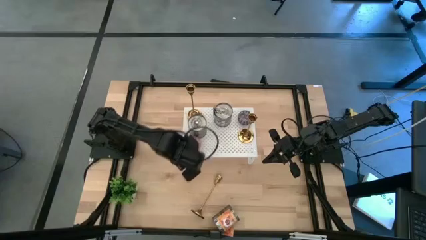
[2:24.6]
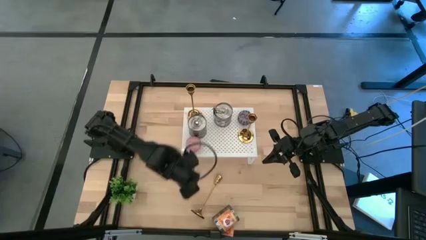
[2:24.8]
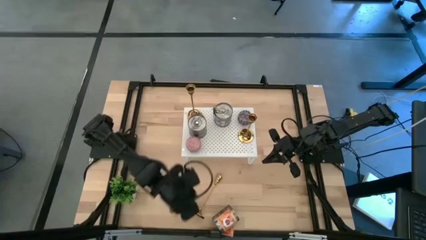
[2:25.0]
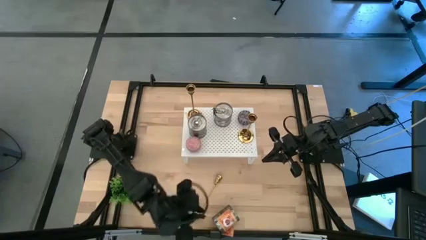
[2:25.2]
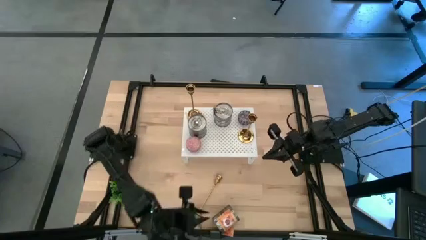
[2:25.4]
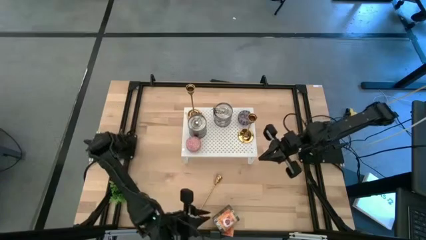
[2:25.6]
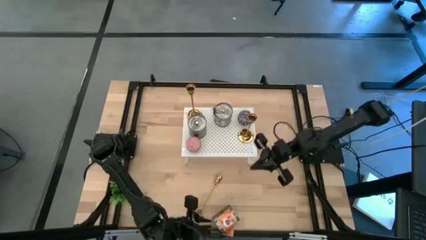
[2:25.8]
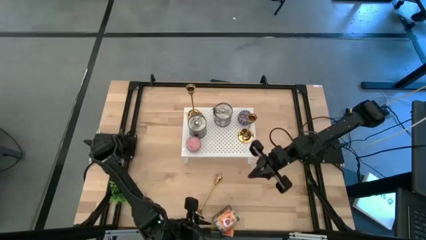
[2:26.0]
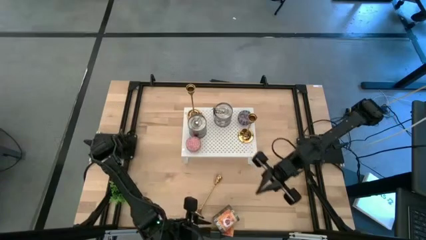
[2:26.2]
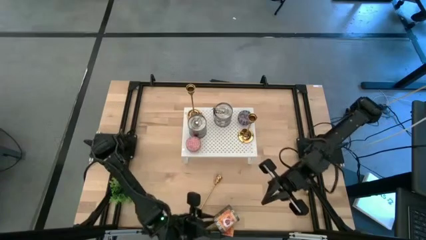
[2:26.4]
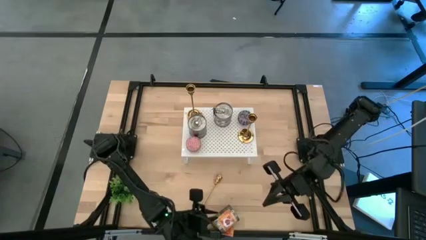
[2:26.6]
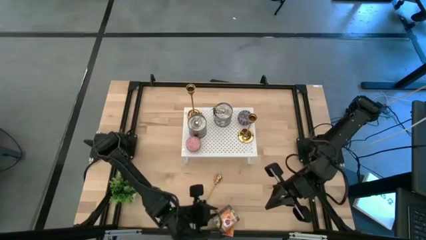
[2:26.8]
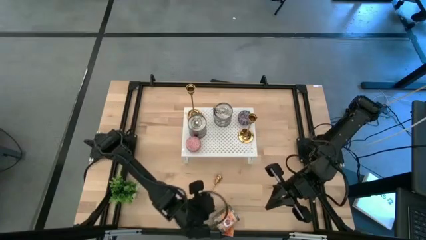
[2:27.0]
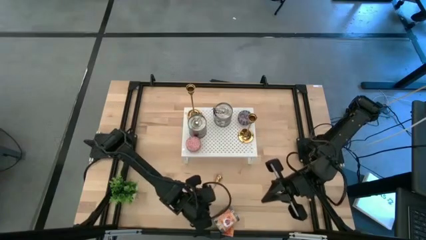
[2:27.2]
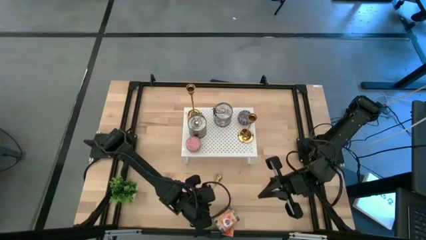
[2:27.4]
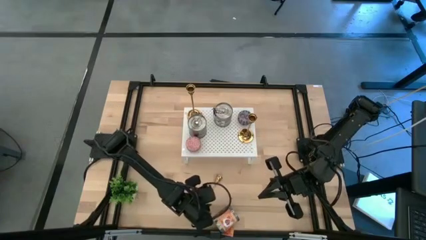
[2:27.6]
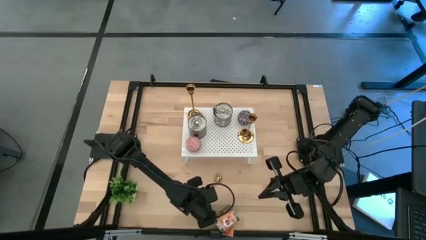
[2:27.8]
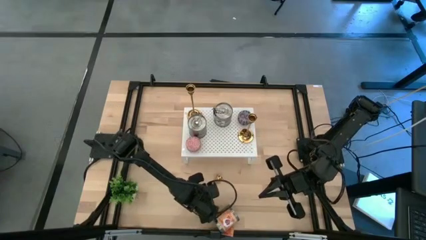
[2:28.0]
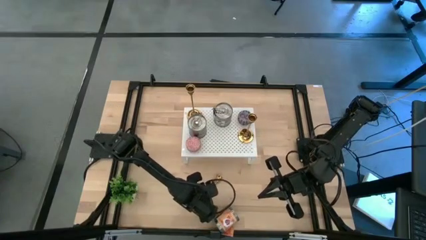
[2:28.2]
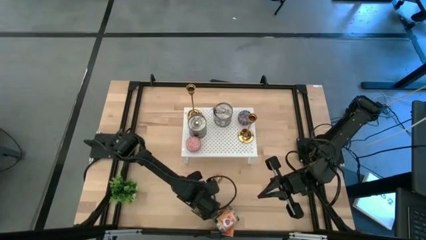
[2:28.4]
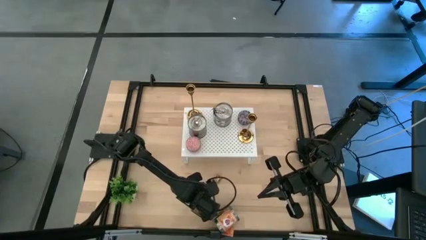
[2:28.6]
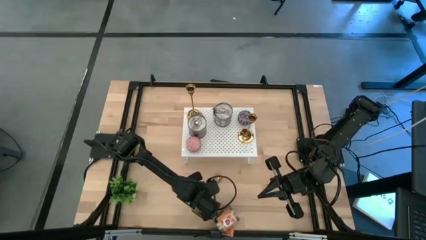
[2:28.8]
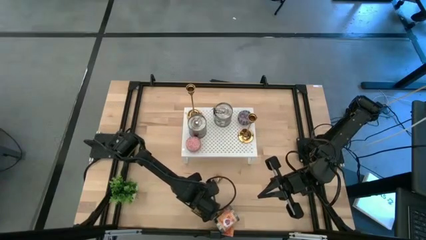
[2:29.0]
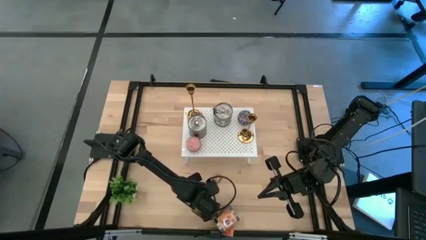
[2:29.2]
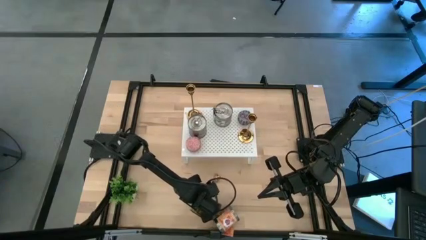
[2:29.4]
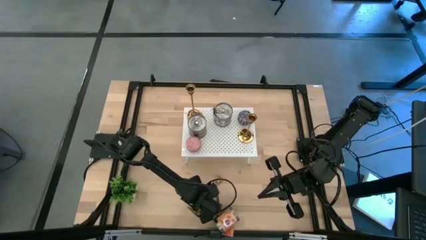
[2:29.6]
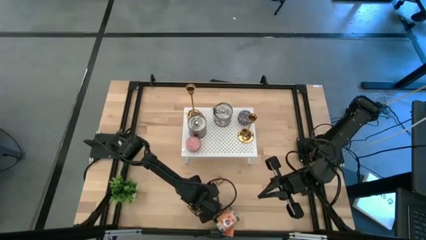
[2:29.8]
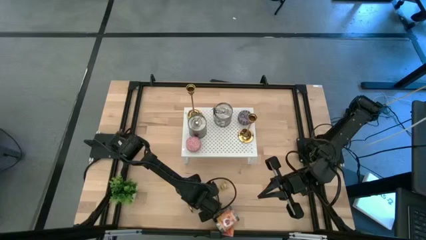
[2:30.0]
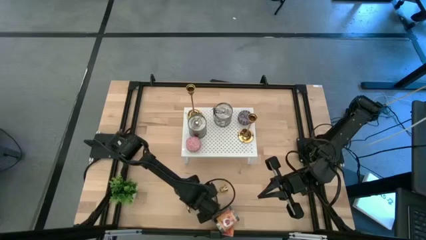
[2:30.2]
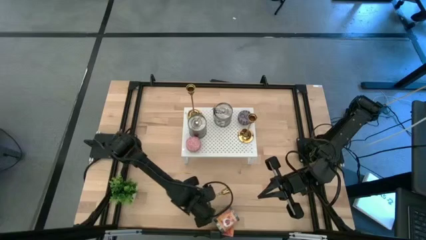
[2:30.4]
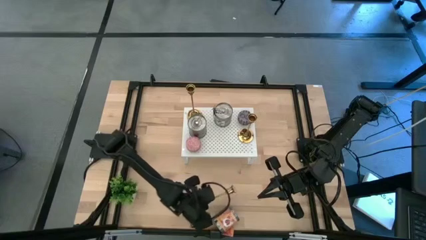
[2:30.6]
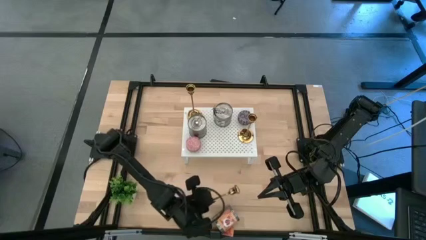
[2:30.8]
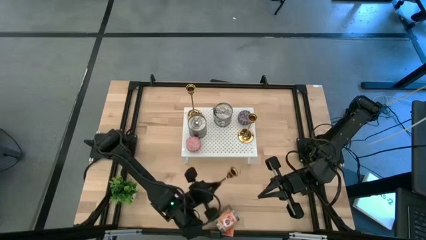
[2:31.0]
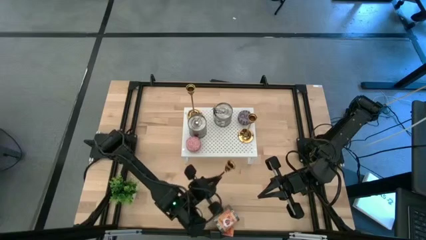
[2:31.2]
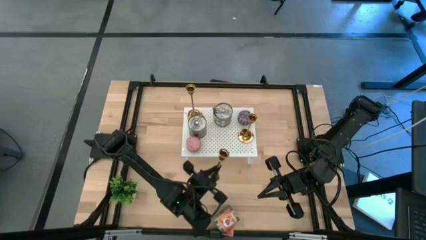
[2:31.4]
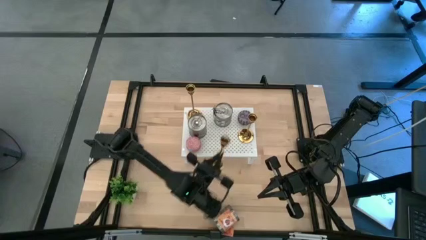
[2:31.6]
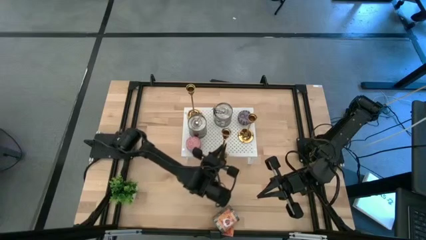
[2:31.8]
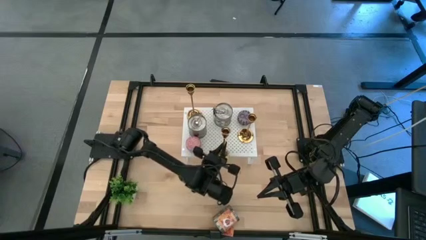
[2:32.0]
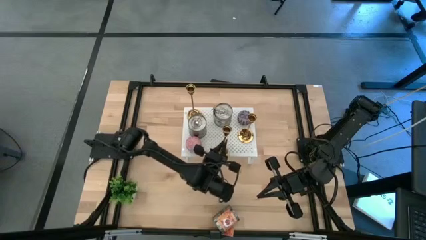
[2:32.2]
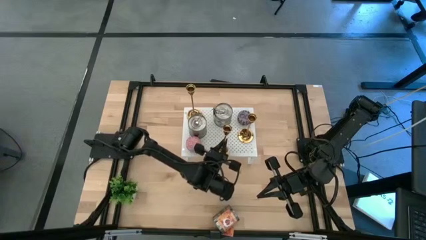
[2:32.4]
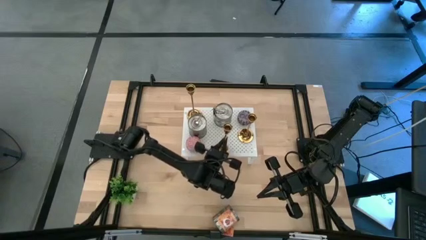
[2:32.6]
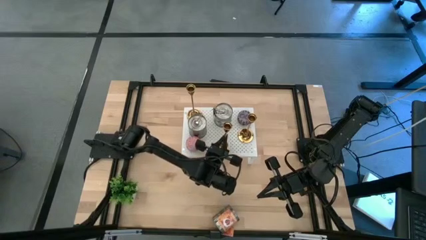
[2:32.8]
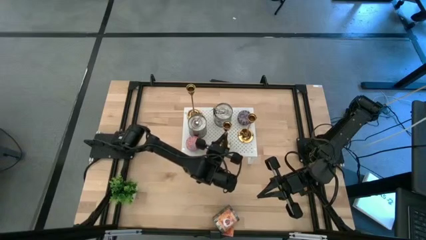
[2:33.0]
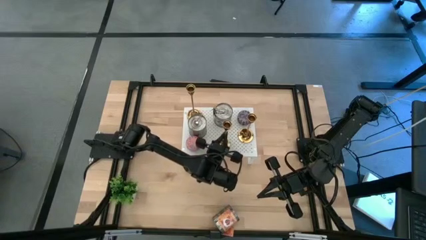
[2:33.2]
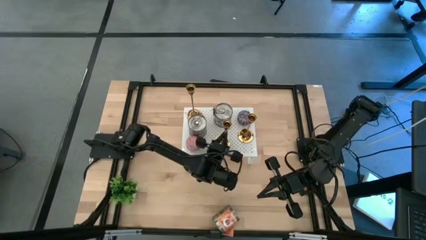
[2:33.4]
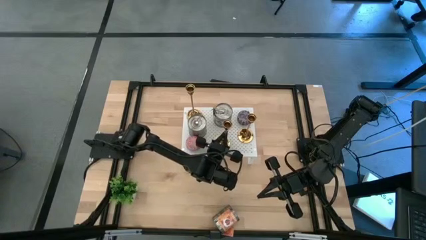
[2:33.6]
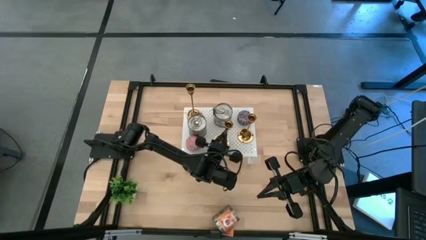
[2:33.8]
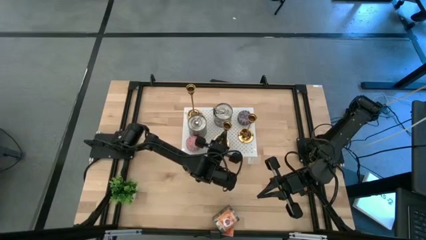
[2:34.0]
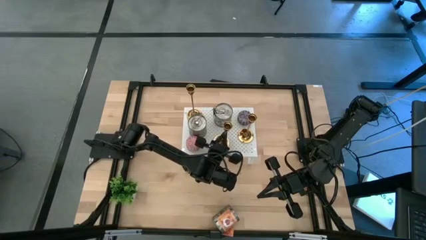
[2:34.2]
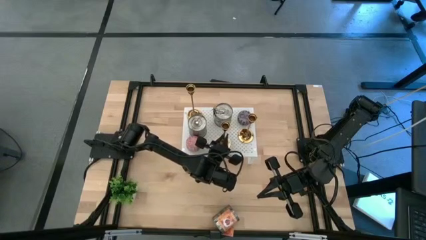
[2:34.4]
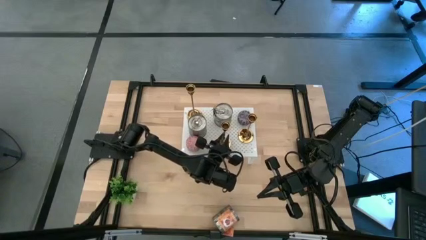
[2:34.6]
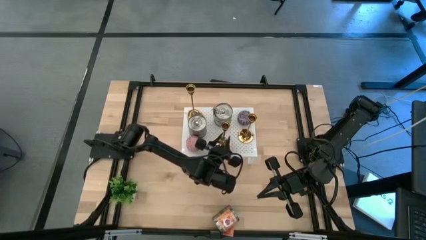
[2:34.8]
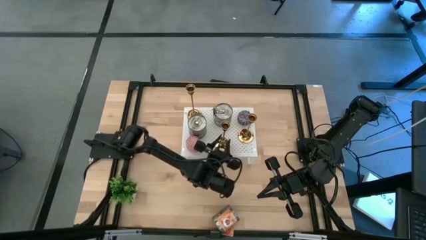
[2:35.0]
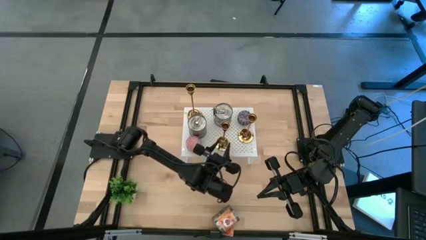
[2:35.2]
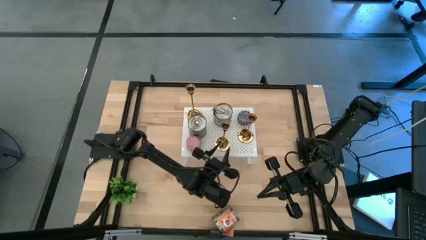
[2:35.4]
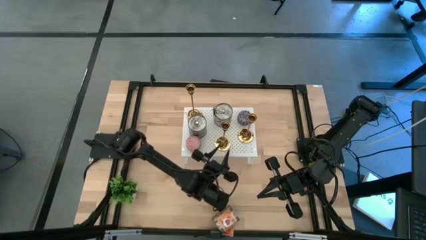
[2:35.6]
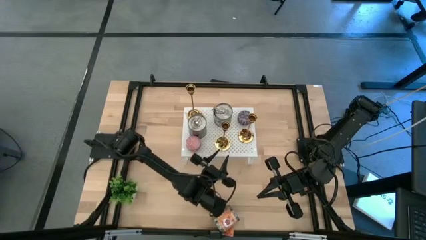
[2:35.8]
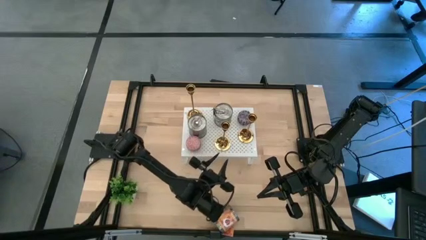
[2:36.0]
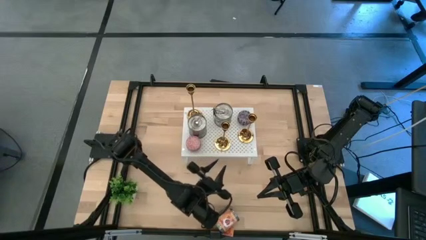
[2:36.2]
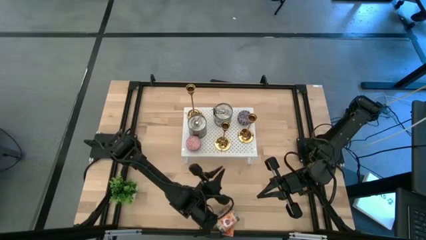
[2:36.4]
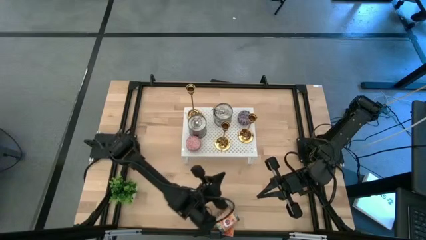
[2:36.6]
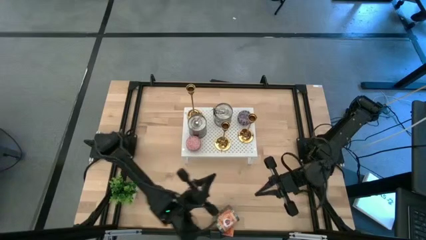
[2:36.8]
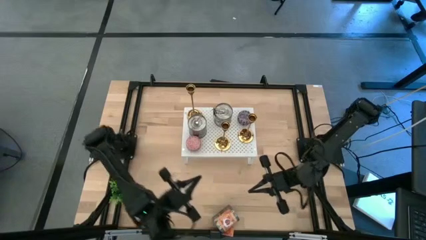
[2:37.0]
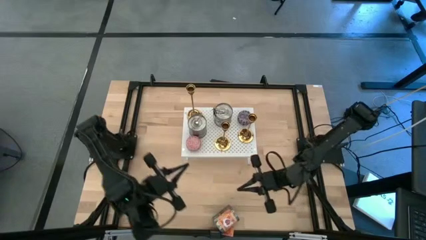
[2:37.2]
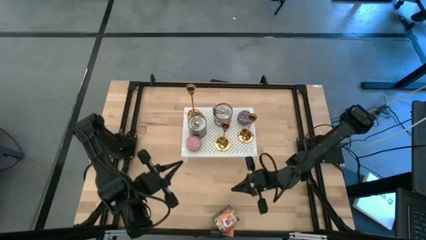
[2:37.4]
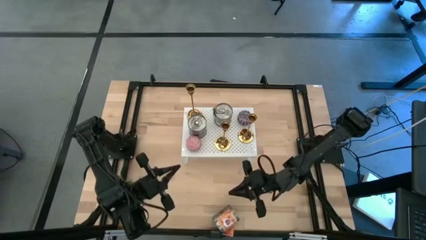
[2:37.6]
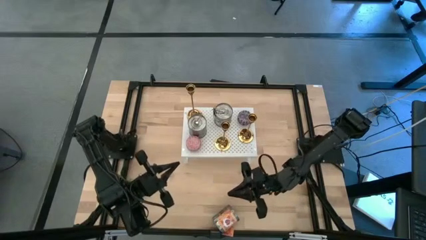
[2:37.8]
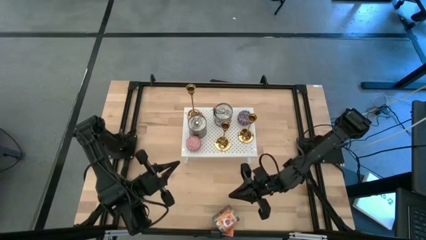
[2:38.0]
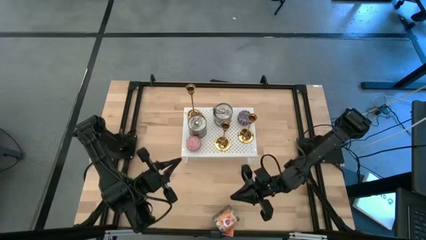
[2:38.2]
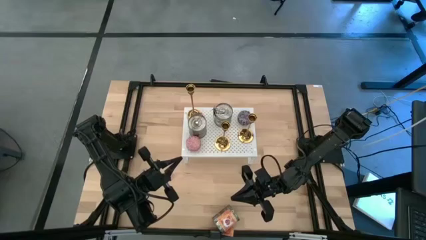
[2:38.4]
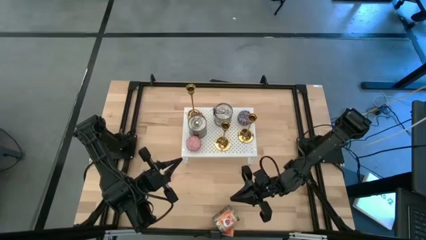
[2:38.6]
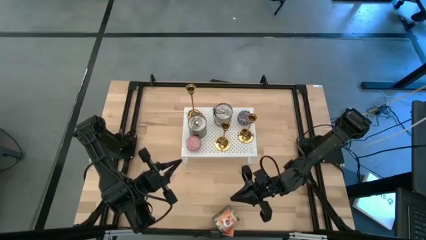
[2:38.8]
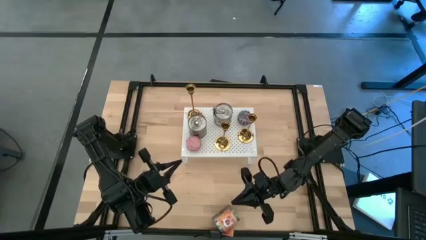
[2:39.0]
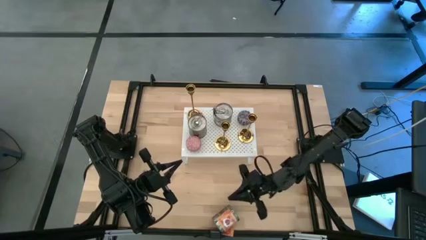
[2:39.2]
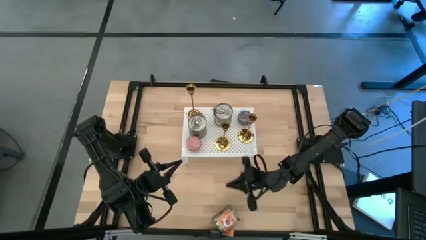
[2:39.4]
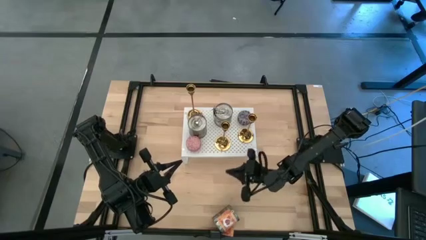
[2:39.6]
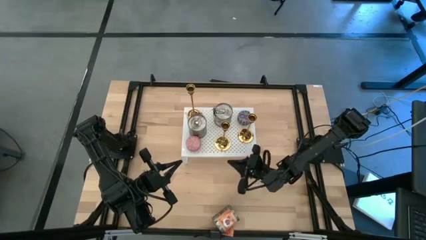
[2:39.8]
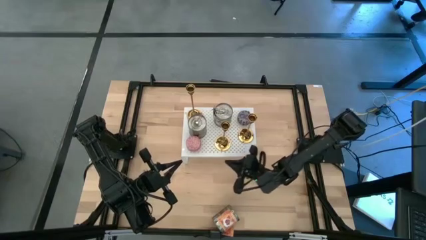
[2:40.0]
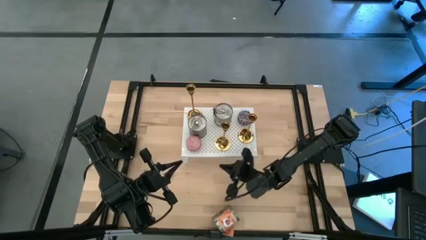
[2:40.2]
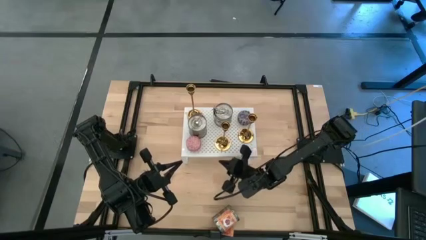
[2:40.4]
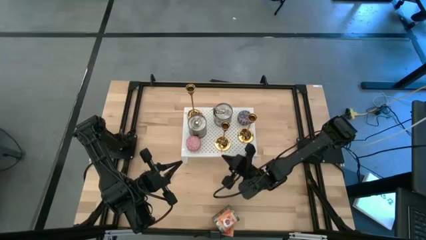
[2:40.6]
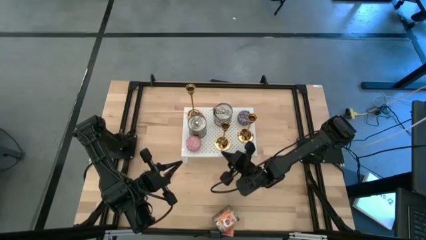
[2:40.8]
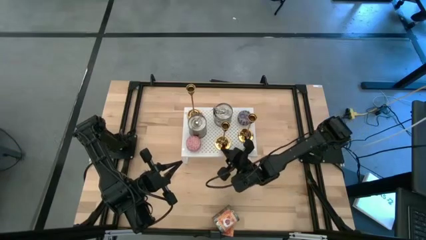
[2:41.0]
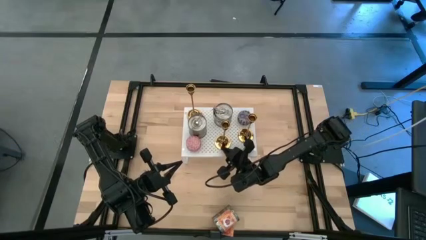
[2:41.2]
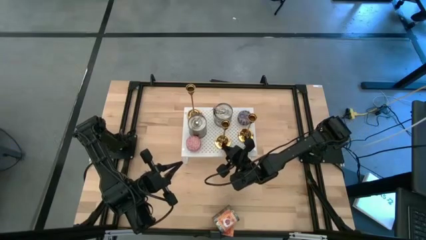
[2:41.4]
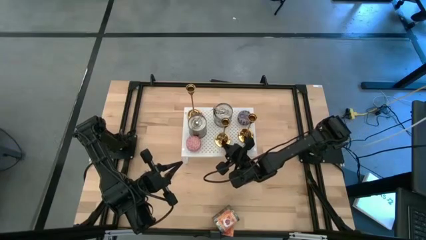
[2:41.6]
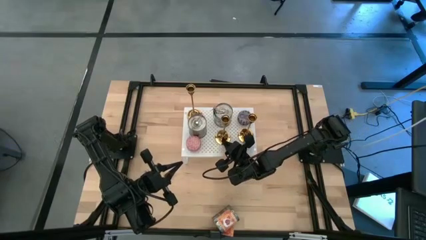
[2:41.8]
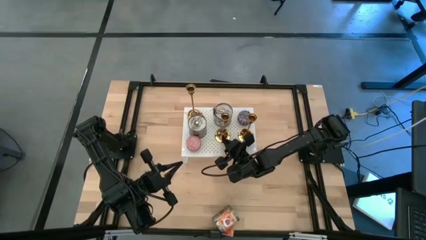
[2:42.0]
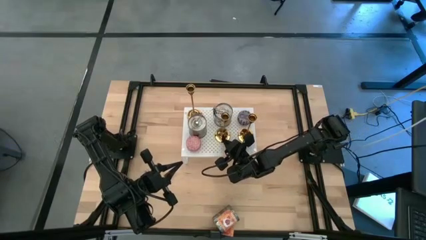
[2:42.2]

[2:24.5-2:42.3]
Task: Pick & Place candle stick holders
Put the gold candle holder on the shelf
